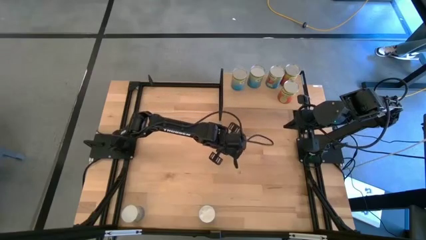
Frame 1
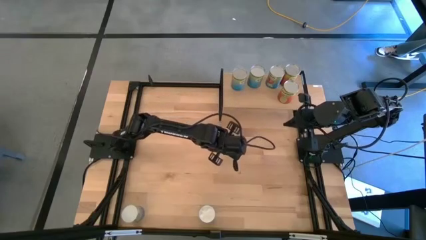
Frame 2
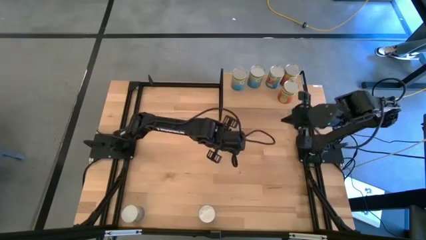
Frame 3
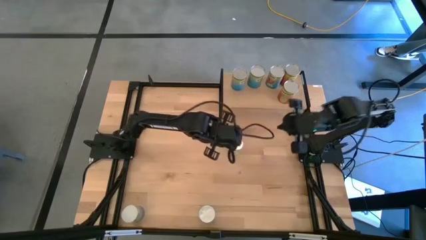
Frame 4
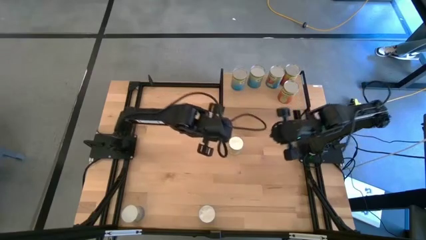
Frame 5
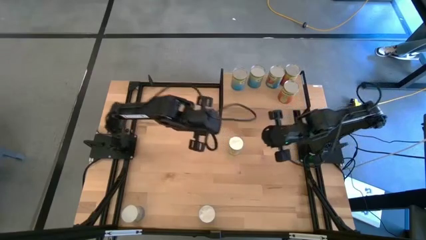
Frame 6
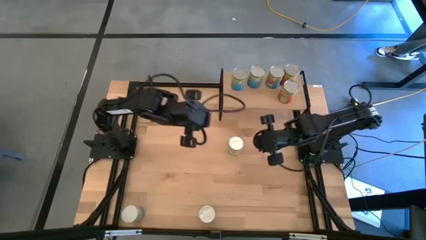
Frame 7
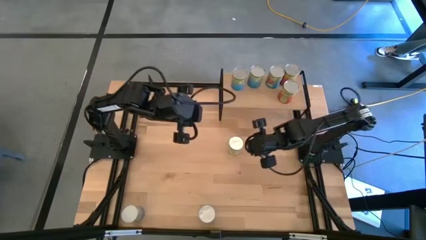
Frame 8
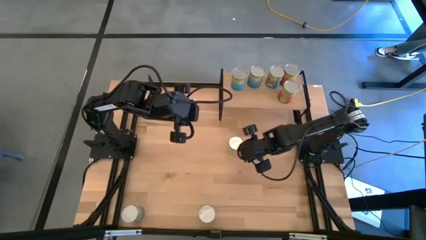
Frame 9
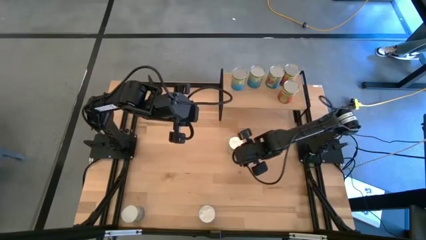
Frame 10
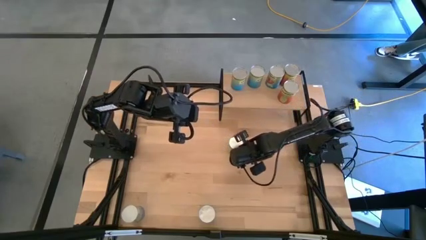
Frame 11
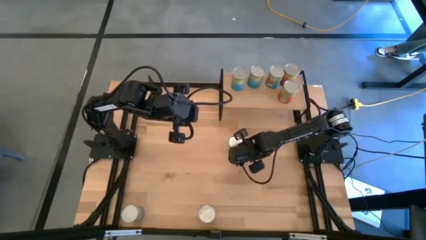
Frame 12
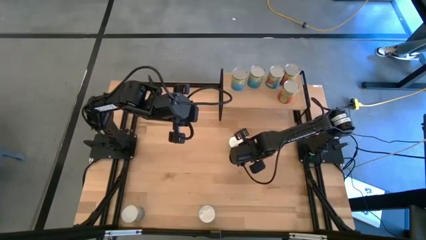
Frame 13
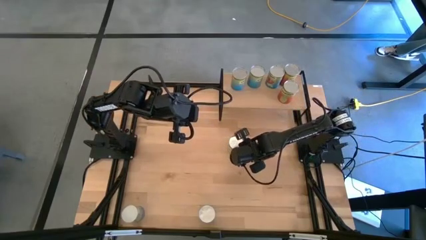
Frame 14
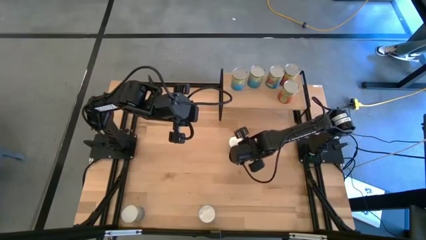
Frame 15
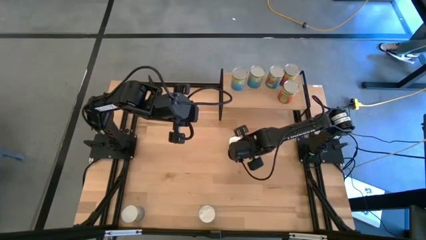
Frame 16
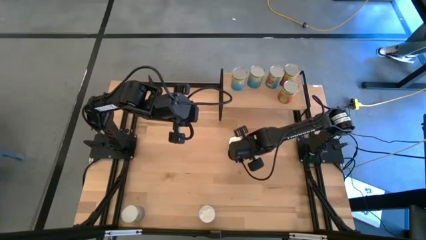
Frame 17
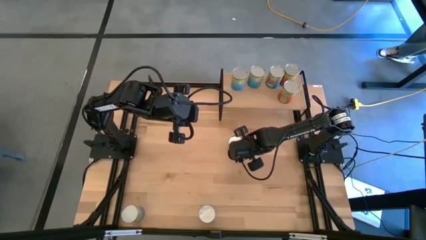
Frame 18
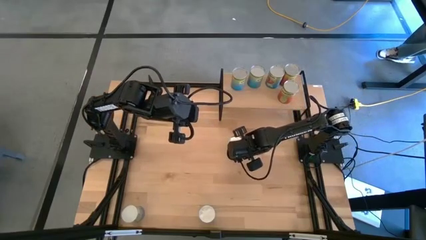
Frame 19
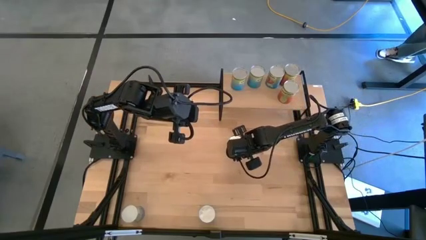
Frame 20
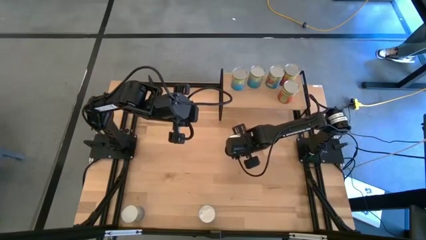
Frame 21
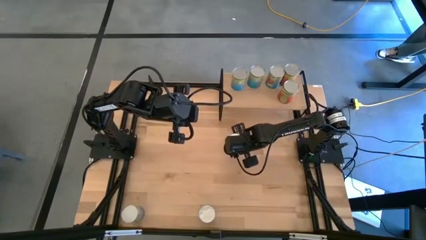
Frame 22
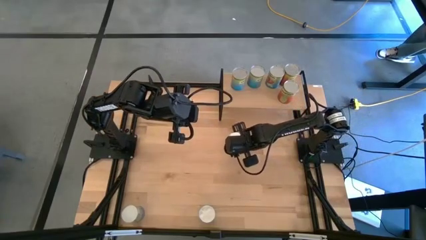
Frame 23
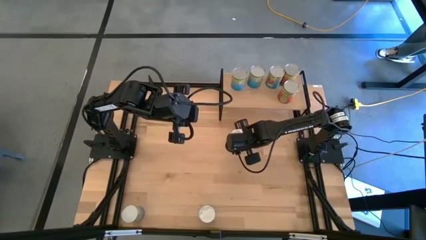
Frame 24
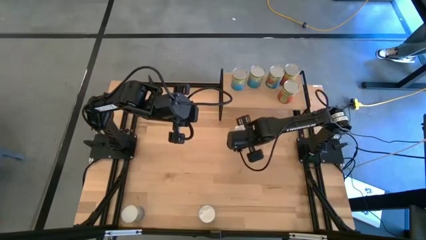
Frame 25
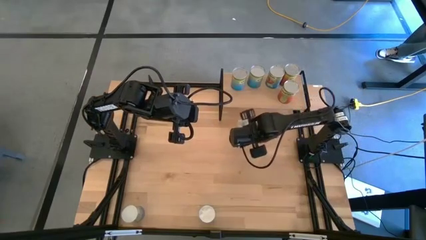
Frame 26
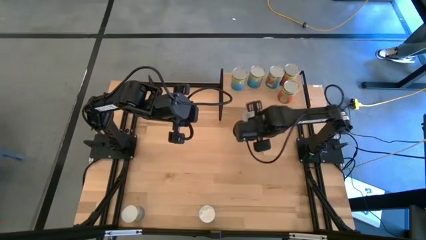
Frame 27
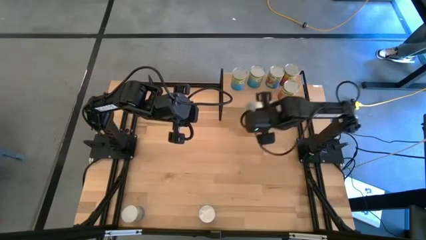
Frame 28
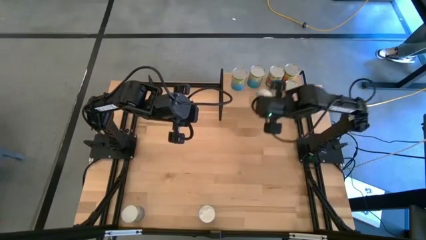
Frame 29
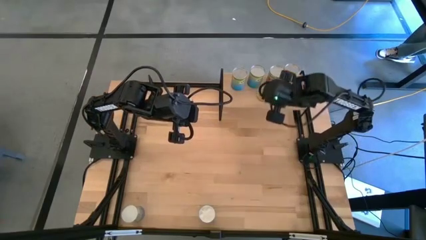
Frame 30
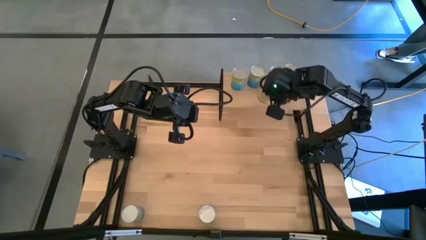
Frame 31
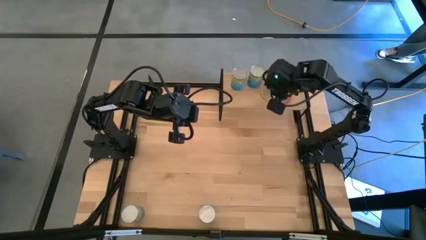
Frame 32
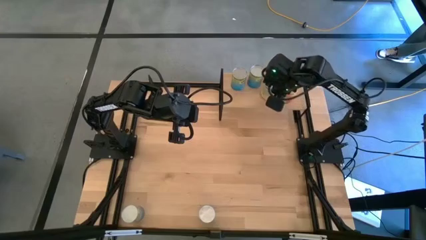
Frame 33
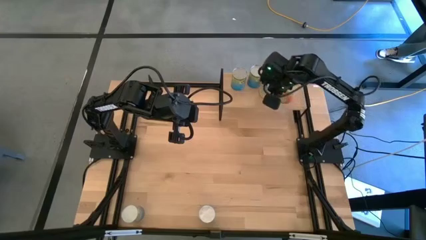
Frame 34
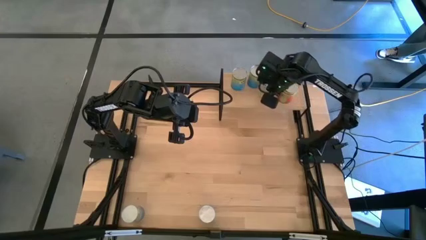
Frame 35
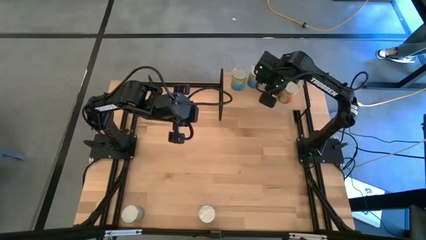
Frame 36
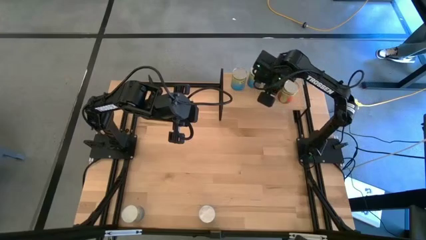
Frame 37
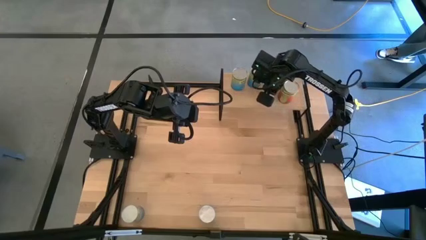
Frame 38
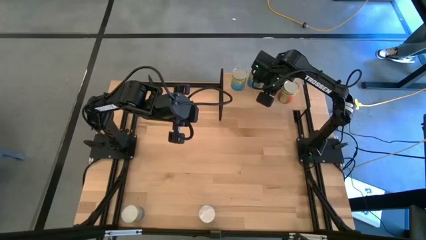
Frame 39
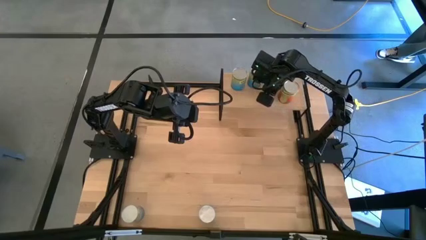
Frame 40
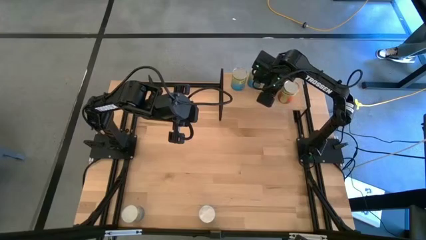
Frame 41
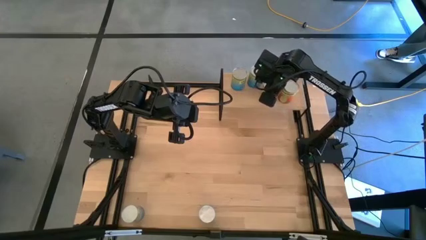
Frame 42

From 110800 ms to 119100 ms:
Task: Pick and place cans onto a shelf
Put the canned carrots on the shelf

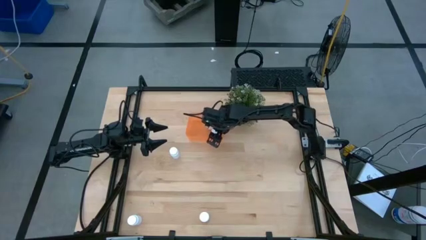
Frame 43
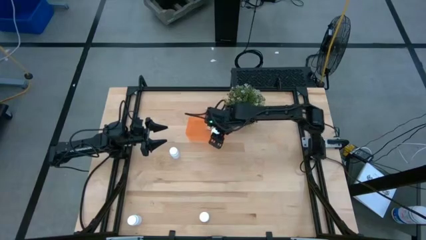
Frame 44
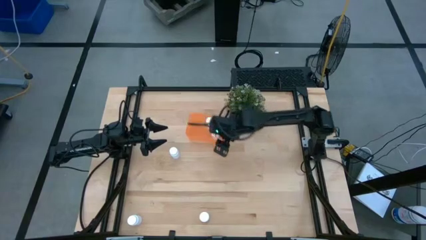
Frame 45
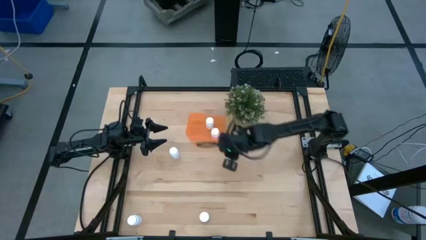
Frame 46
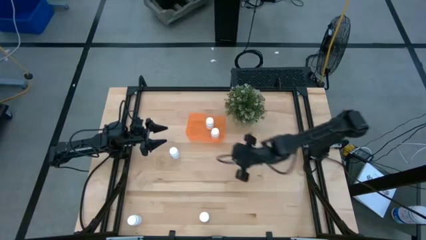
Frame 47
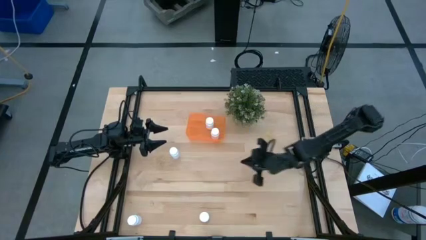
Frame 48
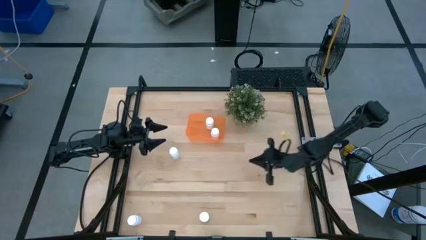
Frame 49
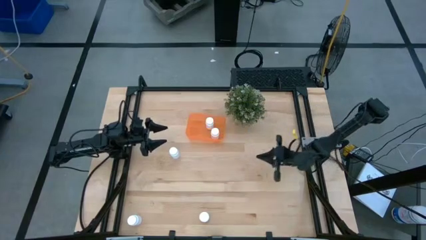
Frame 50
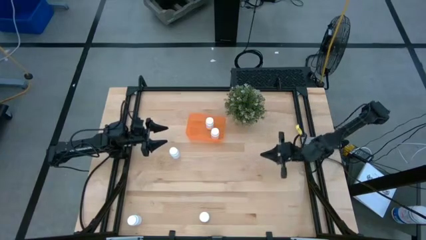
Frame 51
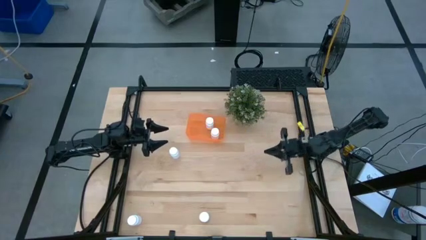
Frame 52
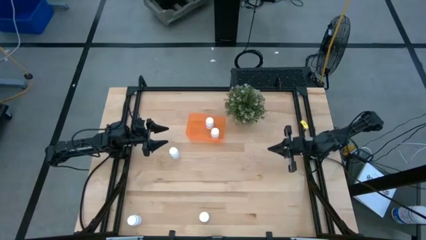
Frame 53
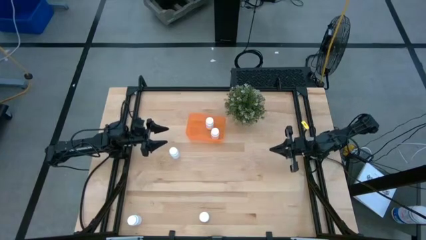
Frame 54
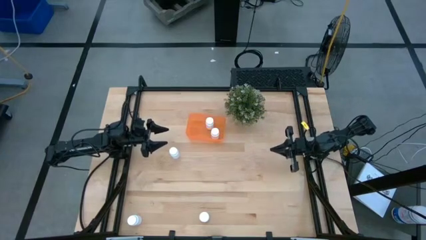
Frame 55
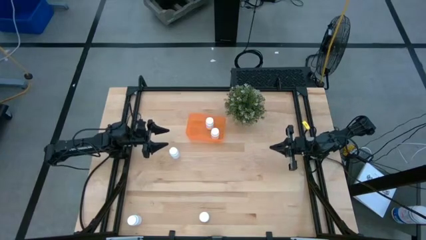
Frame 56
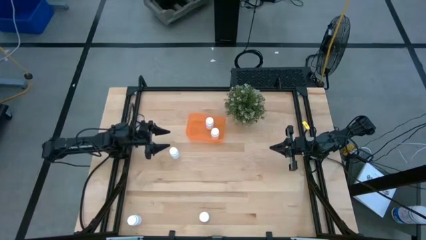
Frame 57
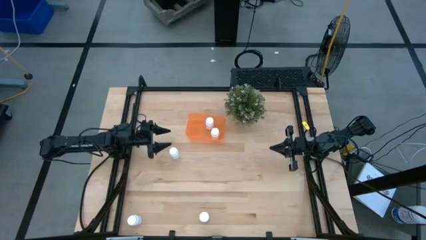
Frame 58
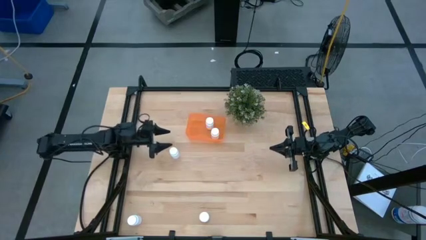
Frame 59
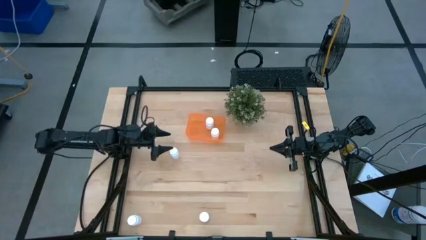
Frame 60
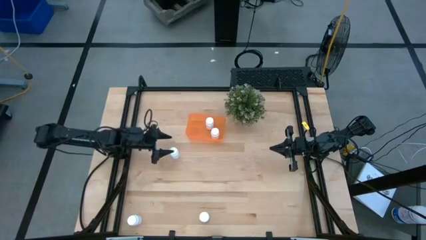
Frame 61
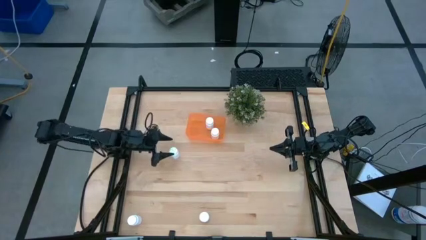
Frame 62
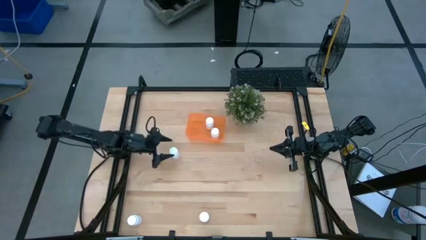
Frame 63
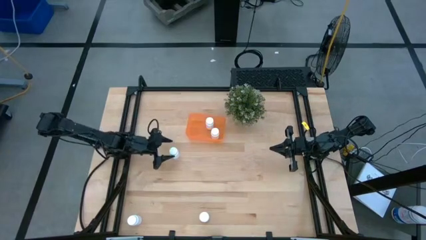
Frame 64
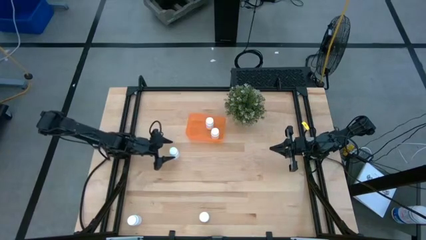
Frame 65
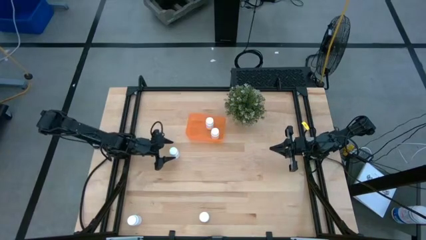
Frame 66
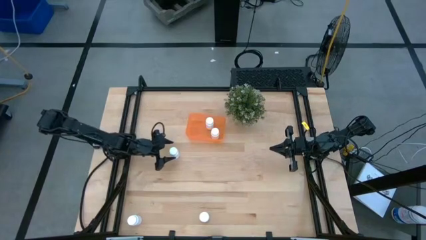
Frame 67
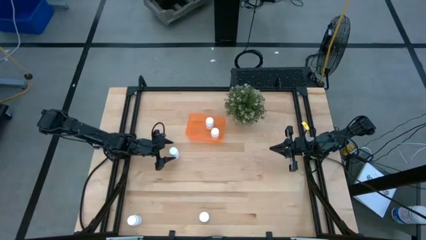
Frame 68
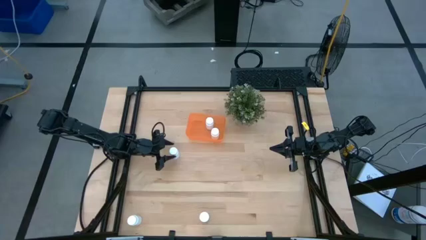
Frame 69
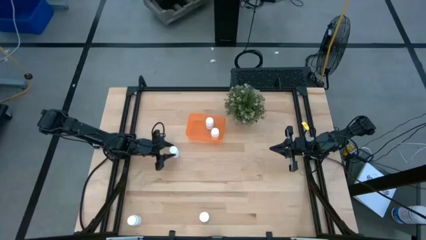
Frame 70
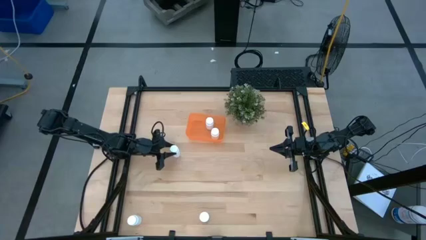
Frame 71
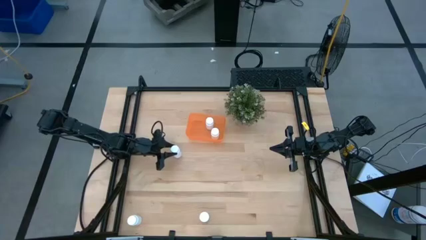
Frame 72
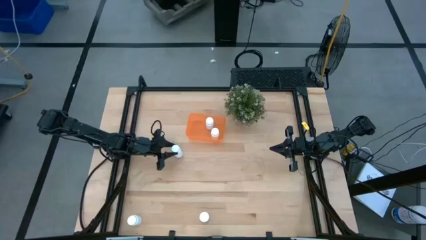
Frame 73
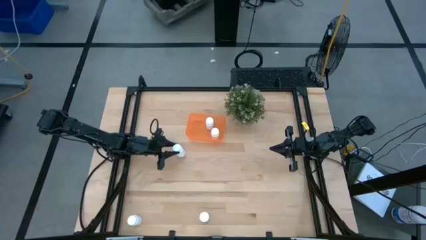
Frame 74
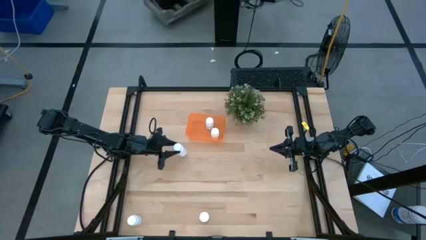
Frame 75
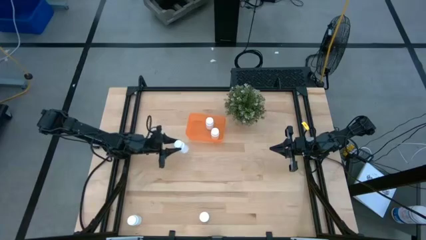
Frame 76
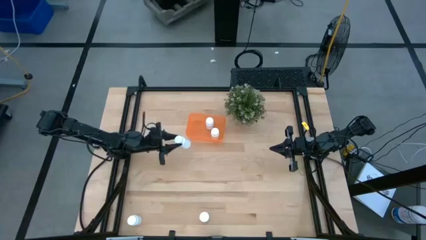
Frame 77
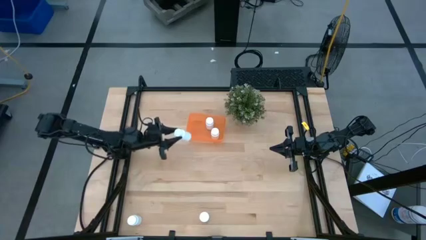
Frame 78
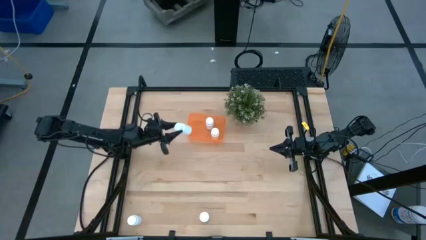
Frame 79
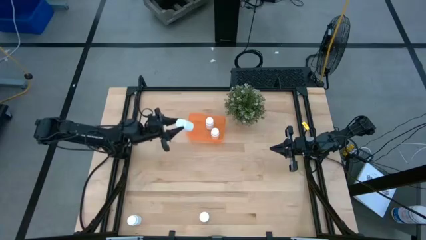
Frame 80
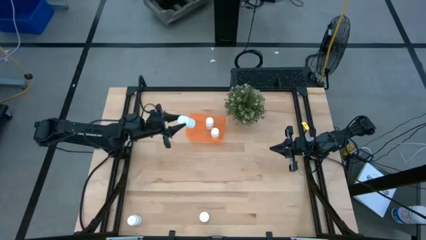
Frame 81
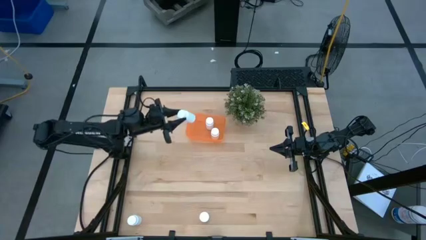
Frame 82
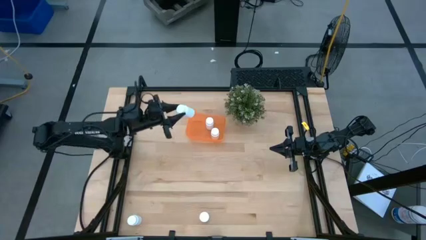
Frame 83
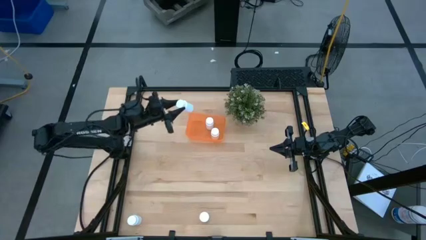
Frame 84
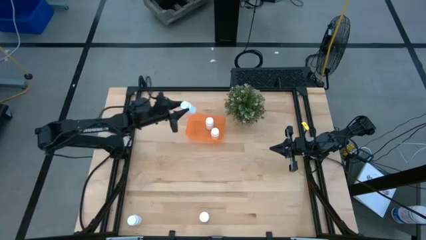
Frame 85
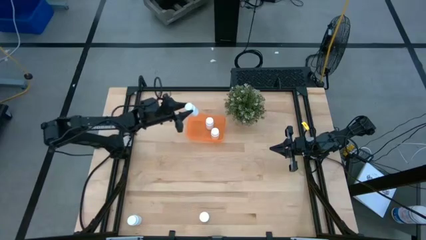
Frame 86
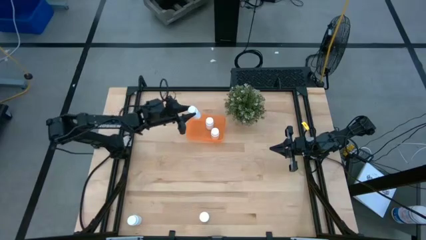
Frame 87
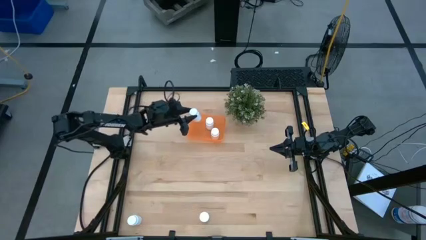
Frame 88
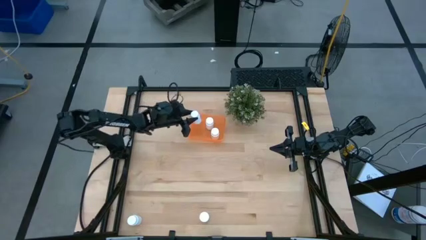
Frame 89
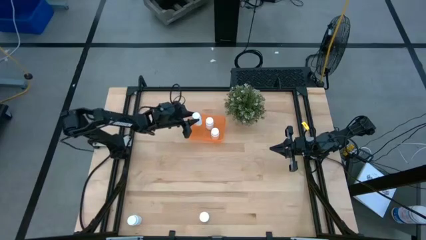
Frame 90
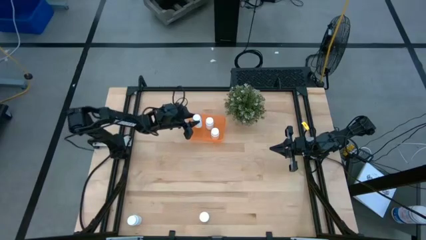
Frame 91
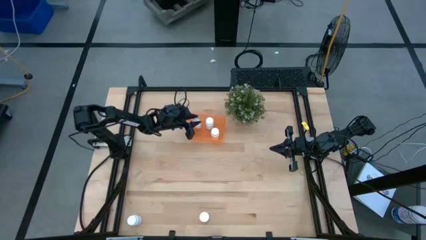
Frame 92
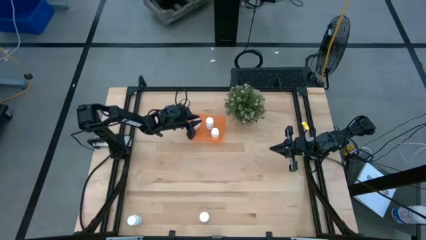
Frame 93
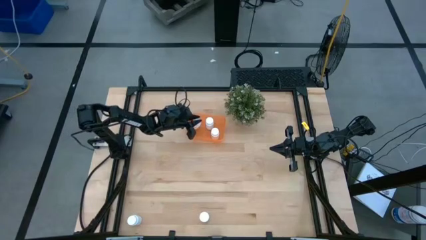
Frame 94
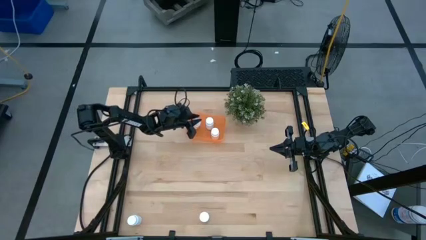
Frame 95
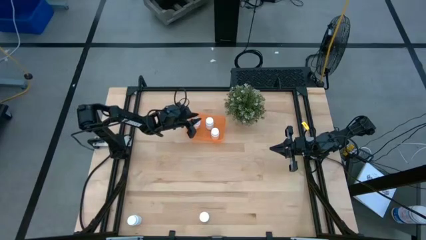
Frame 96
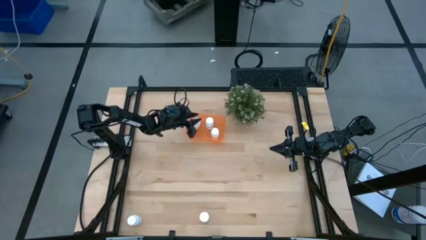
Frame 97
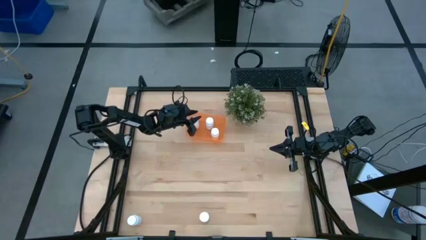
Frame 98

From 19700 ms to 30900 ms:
Task: Pick and place pill bottles into a basket
Put the white pill bottle into the orange bin
